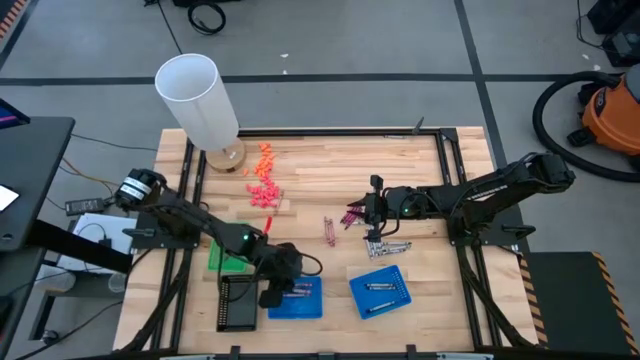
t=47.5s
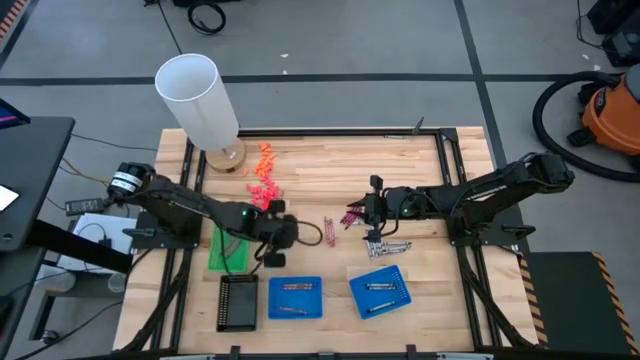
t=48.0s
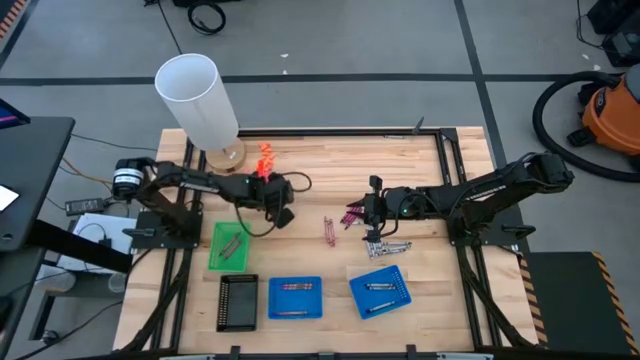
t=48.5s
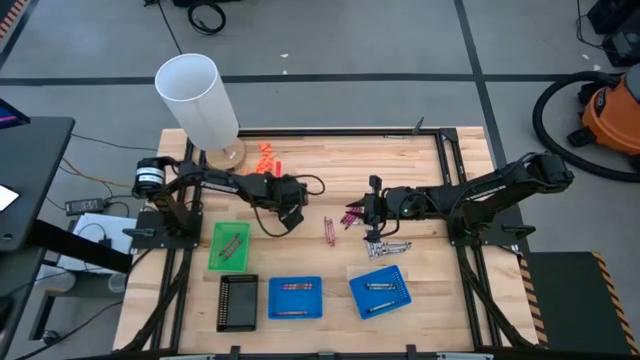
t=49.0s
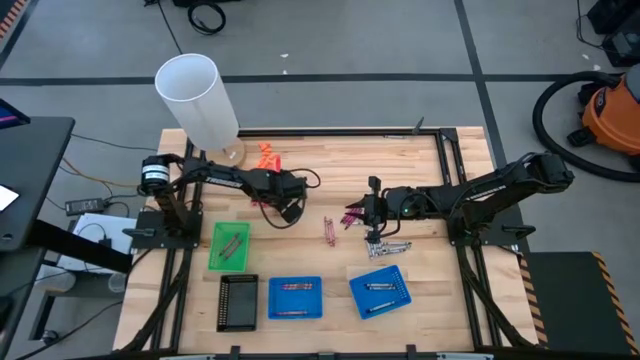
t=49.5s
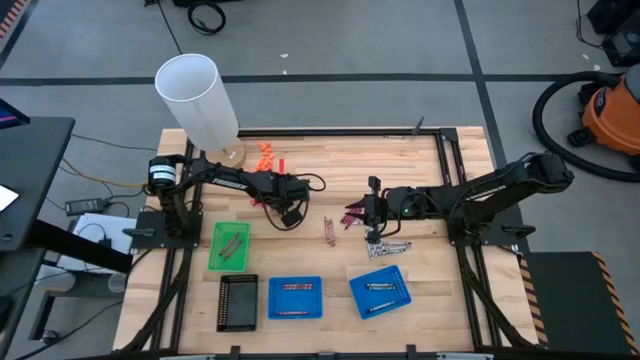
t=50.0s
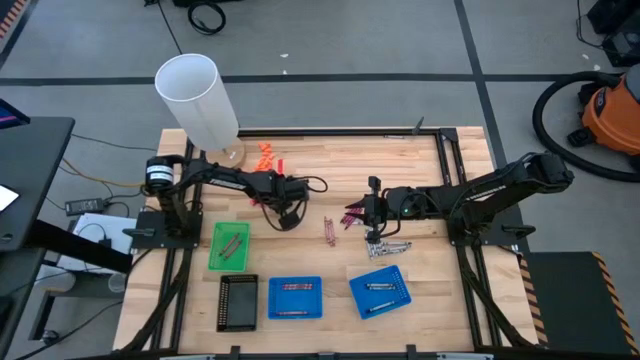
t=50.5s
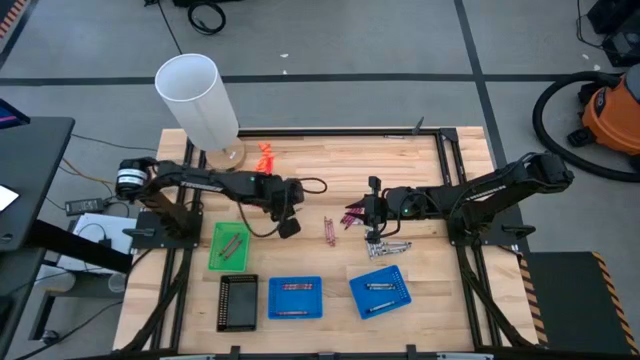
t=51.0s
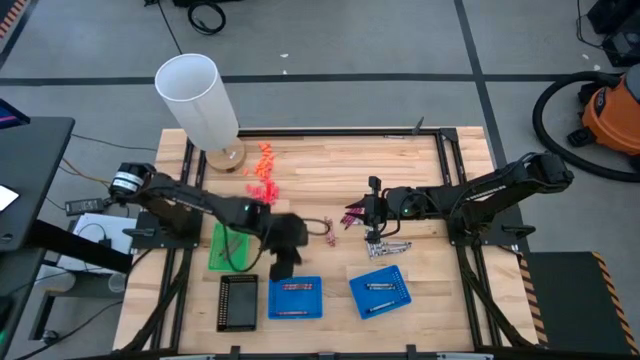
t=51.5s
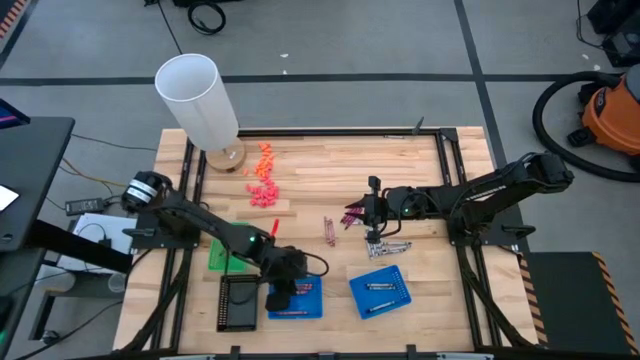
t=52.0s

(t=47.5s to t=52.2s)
Task: Sort crayons
Put the pink crayon into the left blue basket

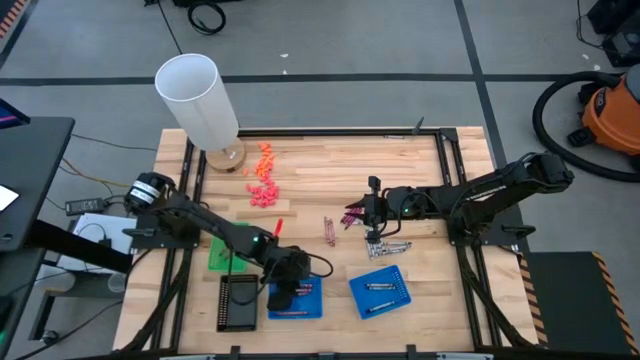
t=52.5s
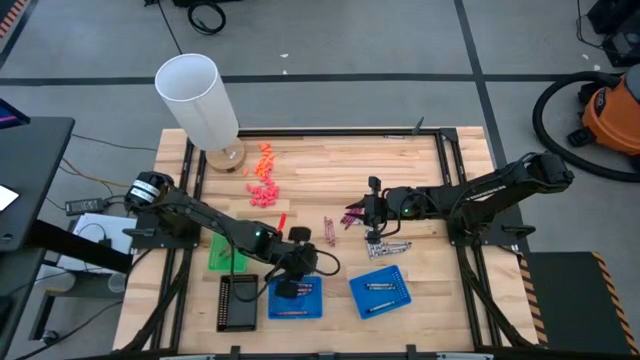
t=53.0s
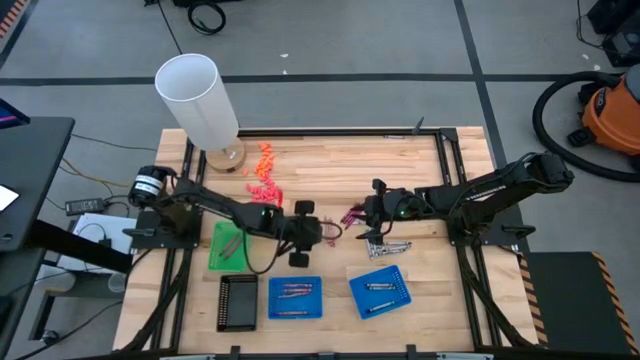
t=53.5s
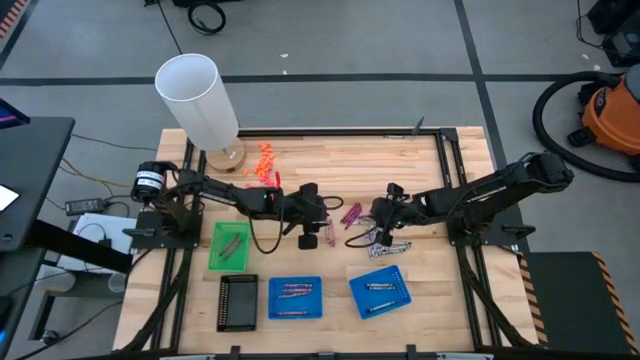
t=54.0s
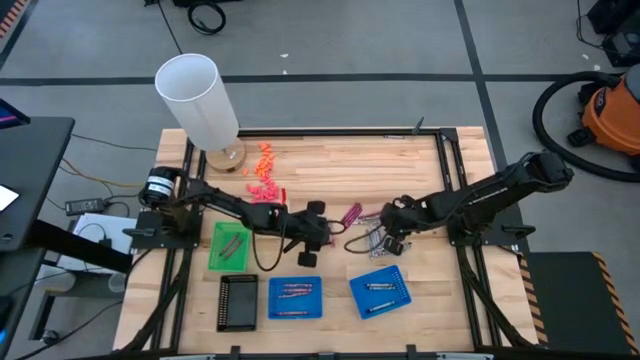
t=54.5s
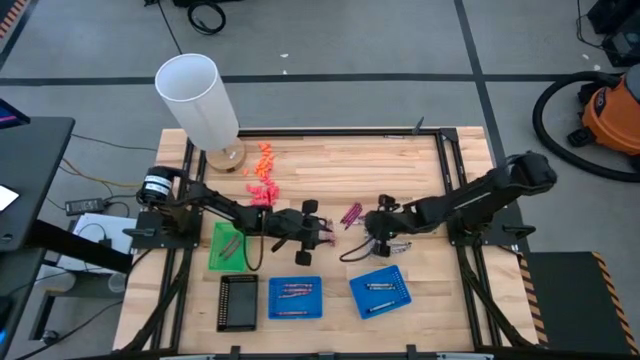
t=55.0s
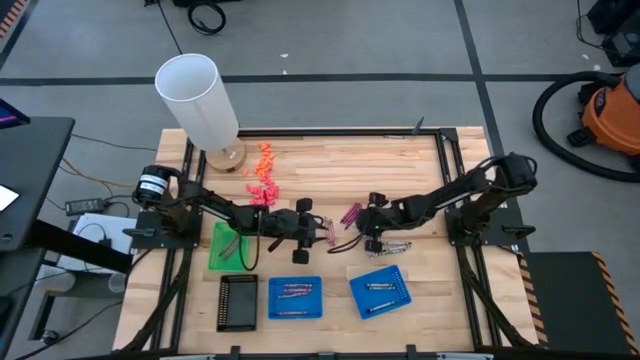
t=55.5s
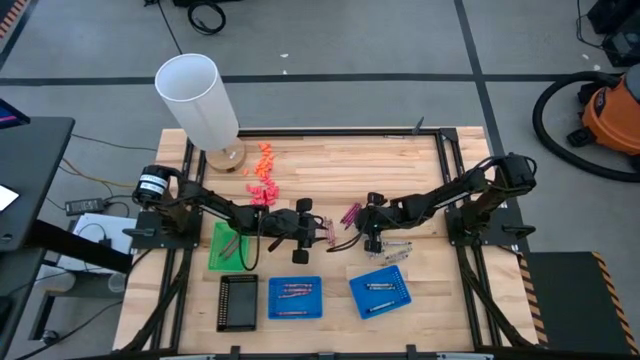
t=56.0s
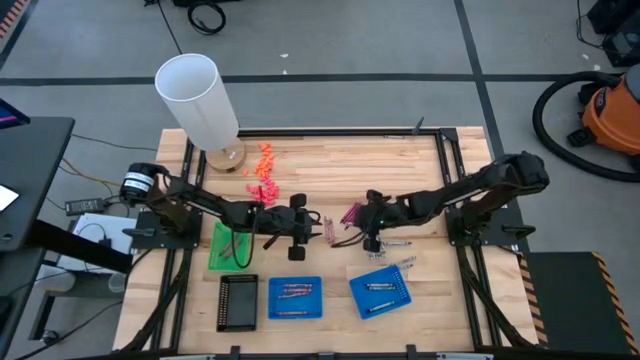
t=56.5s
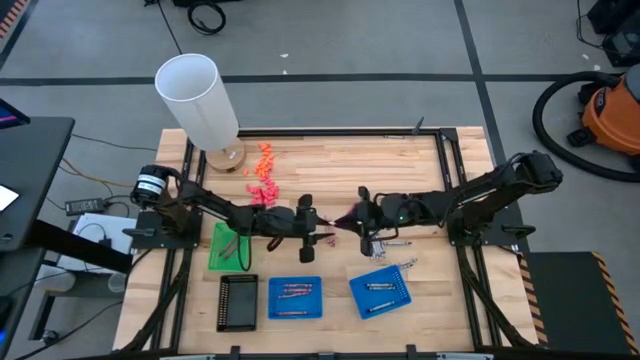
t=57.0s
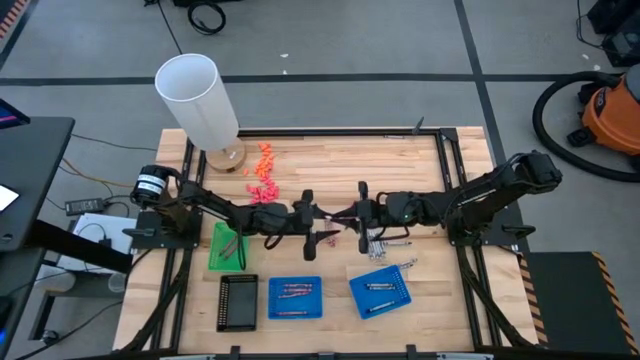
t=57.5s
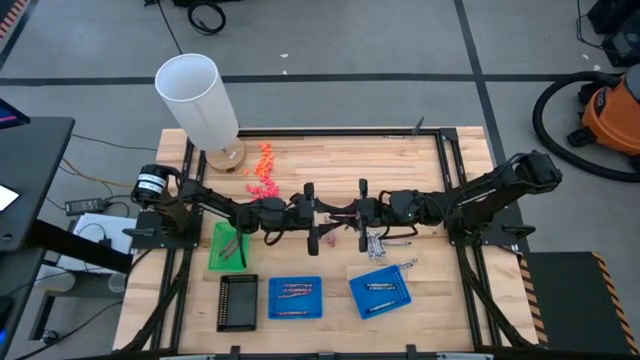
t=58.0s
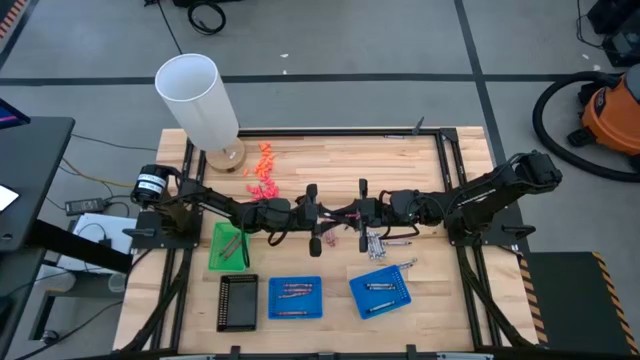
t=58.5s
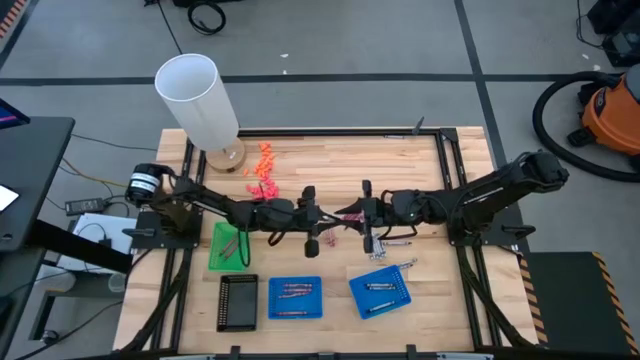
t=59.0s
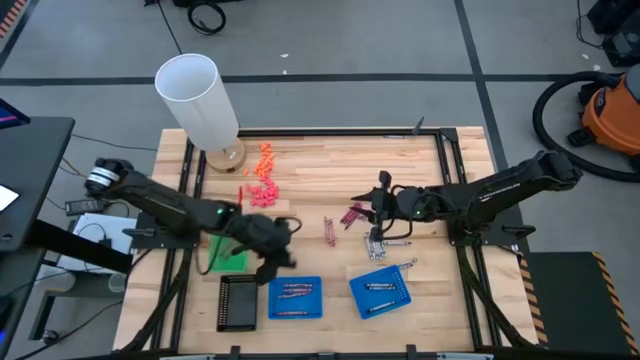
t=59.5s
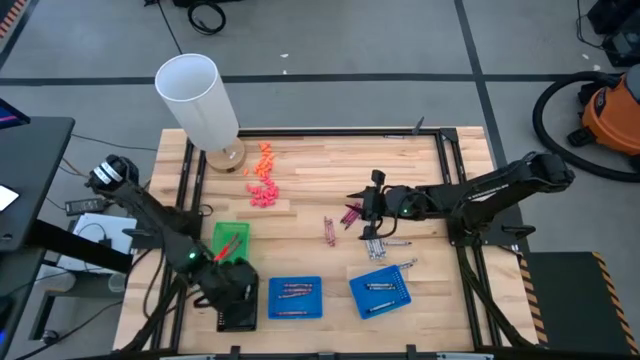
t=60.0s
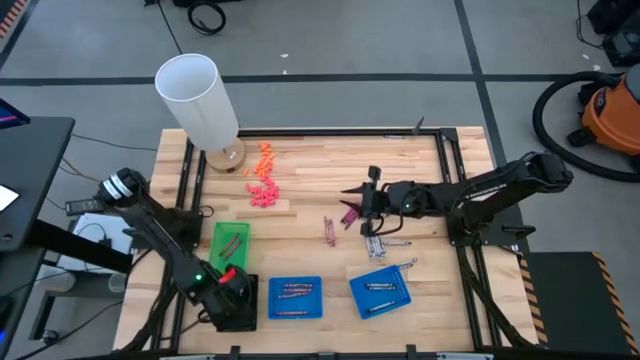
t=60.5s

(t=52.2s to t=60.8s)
Put the white crayon into the black basket

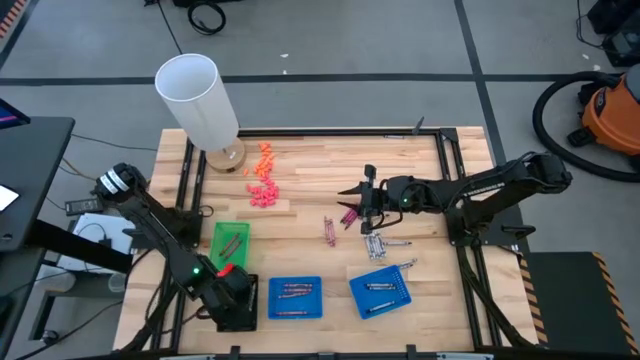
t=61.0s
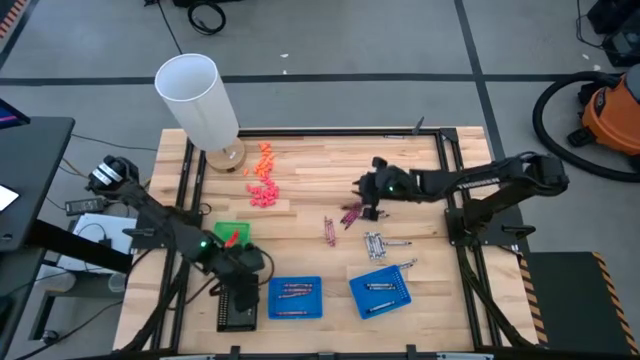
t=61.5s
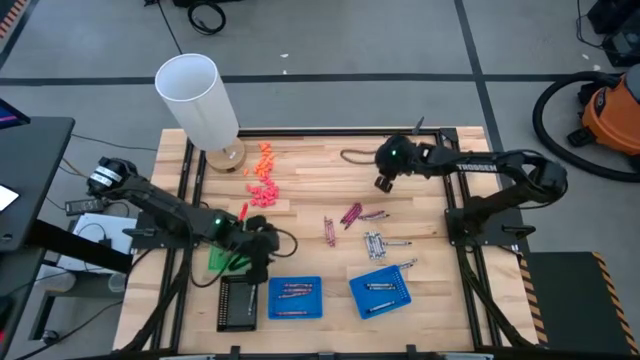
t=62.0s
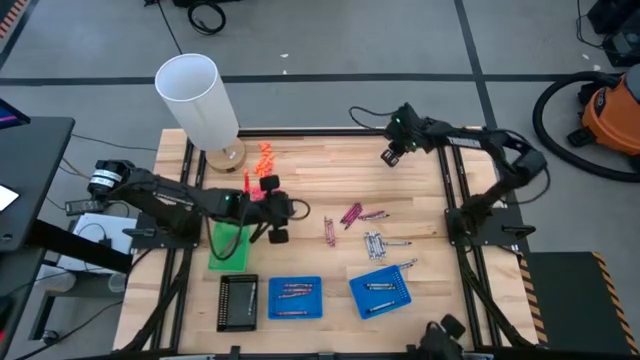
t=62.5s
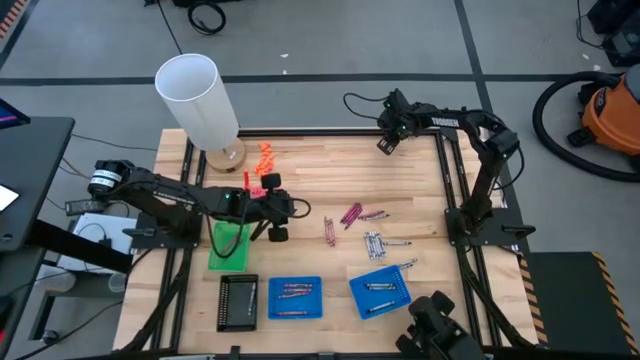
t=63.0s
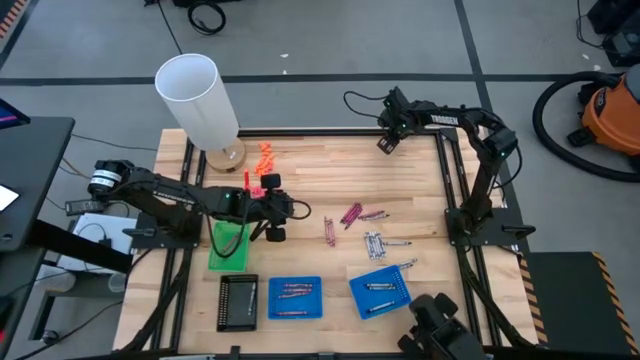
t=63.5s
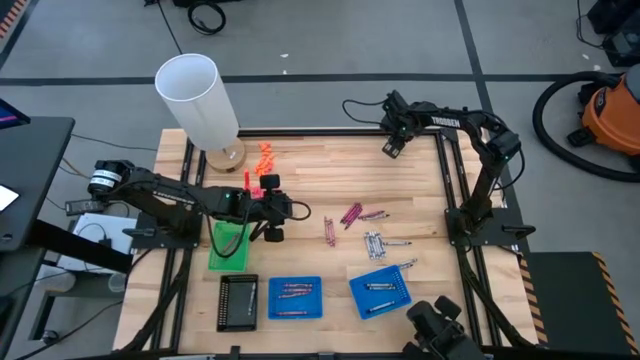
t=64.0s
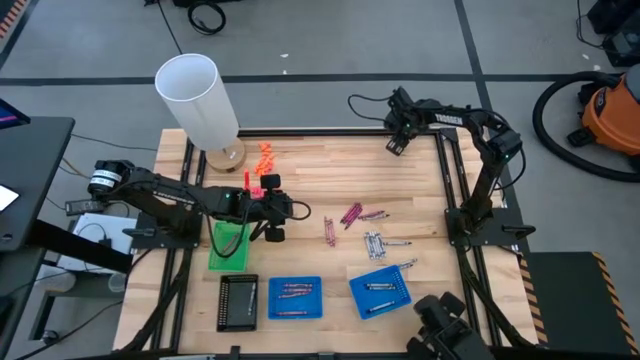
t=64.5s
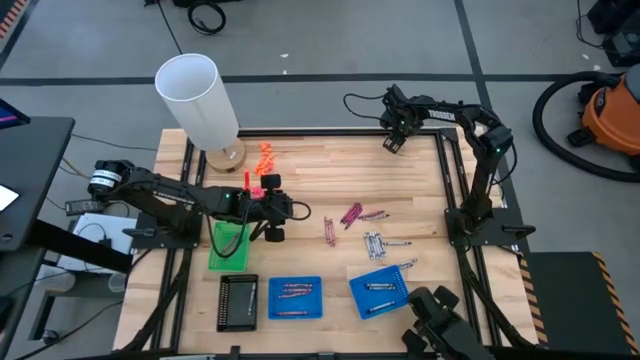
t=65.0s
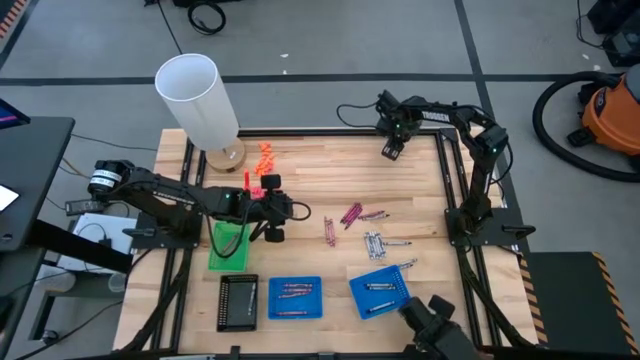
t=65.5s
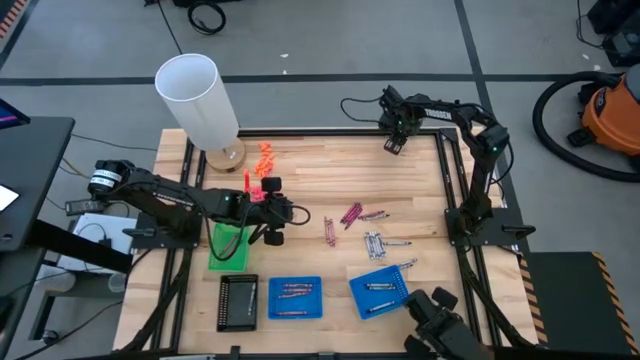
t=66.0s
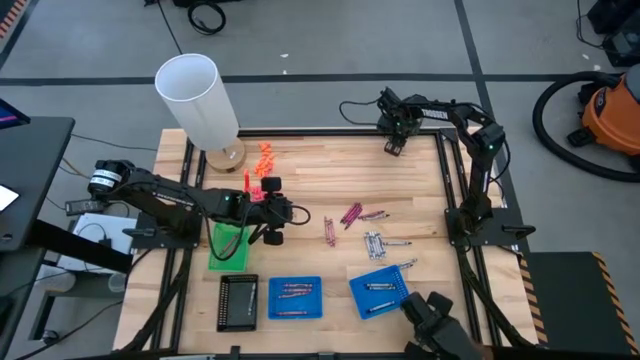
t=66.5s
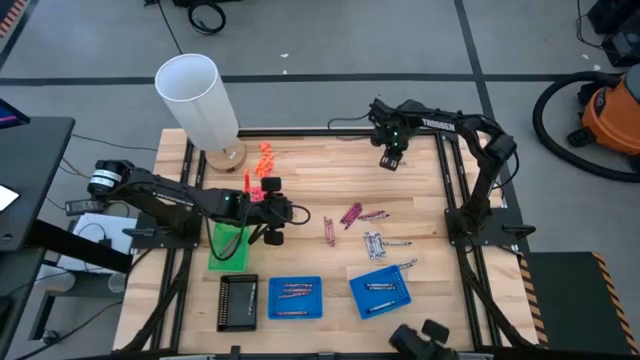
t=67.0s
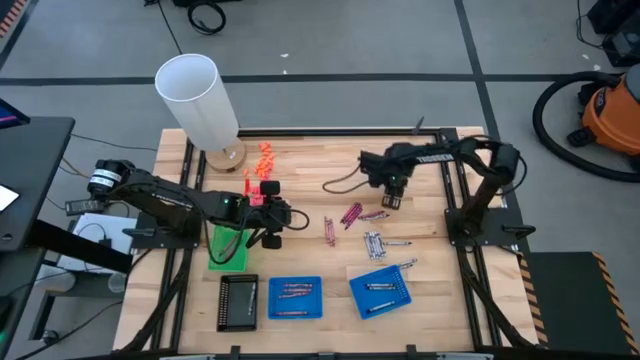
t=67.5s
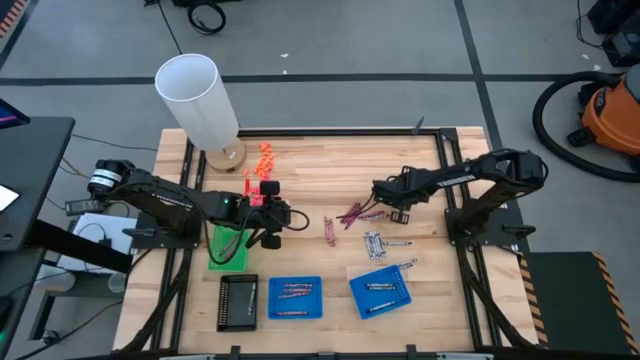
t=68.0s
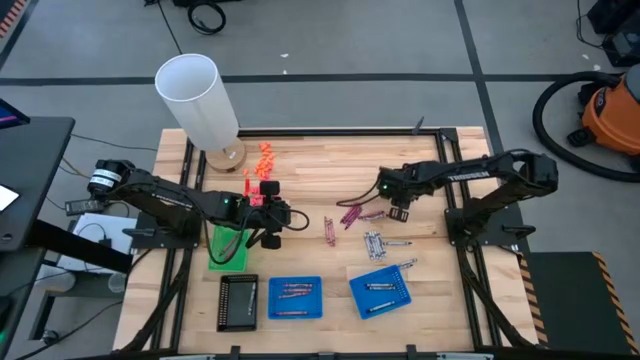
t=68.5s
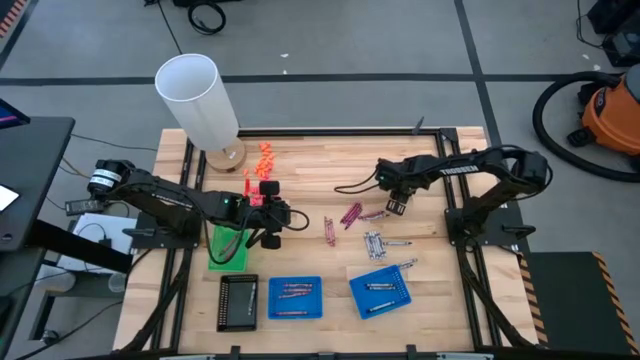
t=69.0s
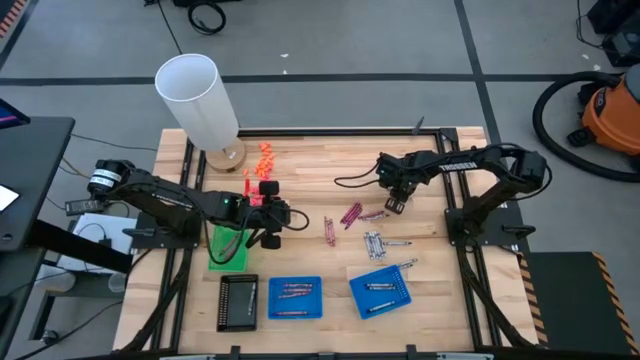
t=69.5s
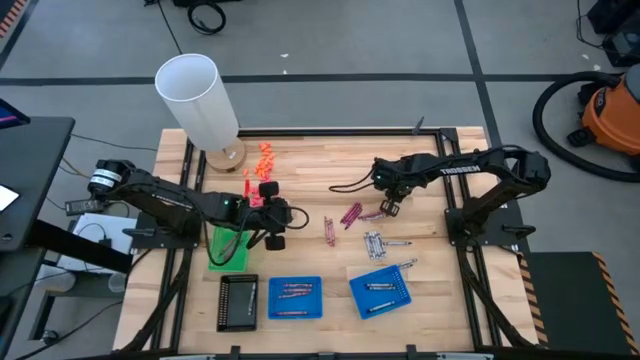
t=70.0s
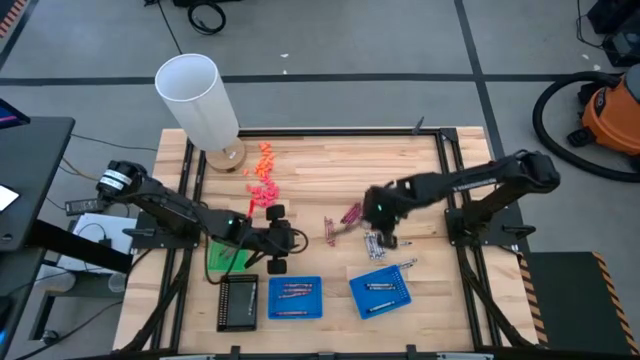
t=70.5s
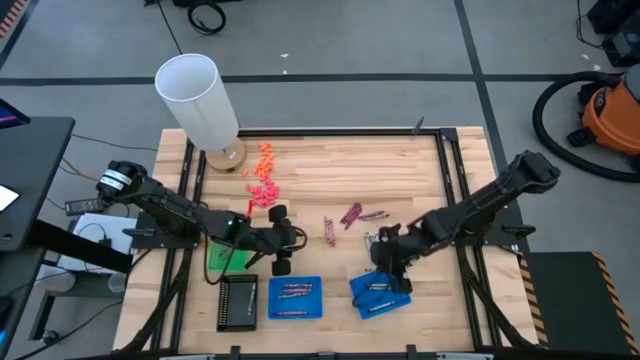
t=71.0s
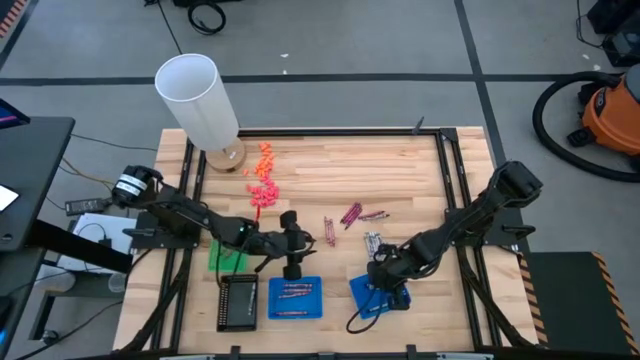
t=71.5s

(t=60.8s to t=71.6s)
Put the black crayon into the right blue basket
